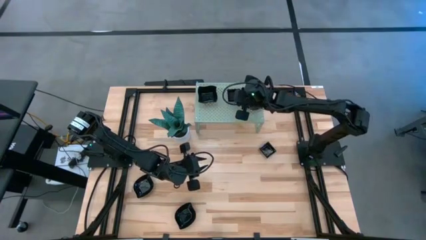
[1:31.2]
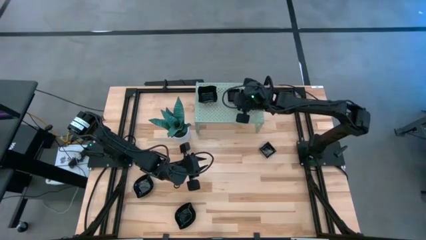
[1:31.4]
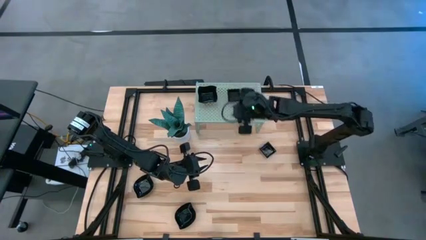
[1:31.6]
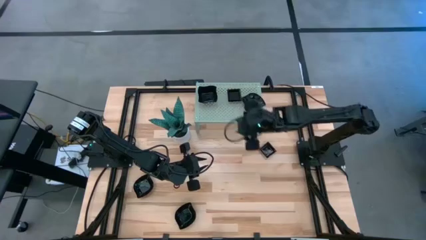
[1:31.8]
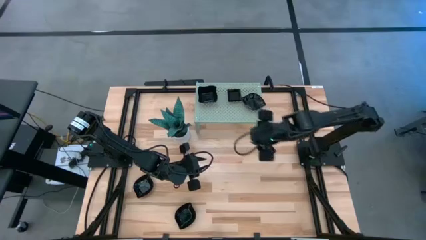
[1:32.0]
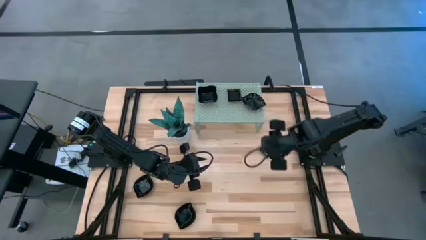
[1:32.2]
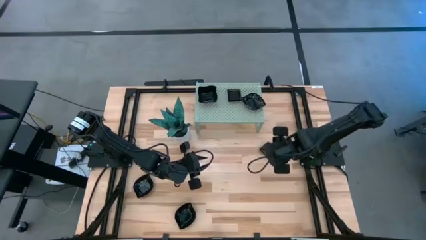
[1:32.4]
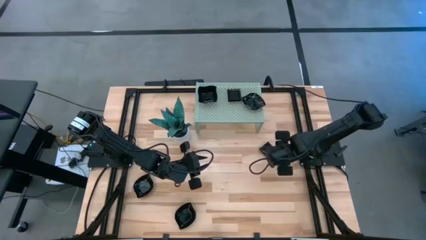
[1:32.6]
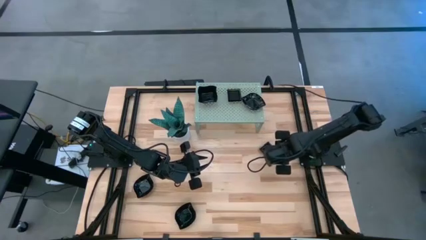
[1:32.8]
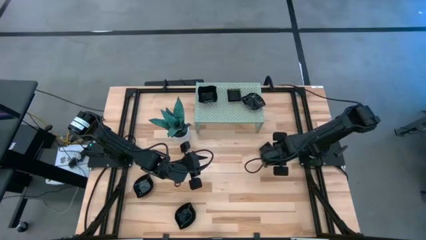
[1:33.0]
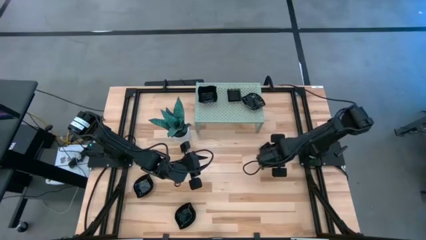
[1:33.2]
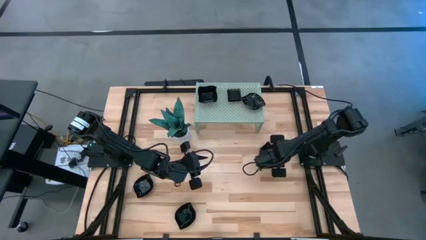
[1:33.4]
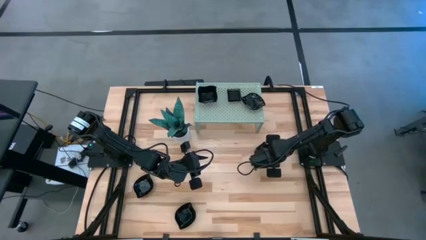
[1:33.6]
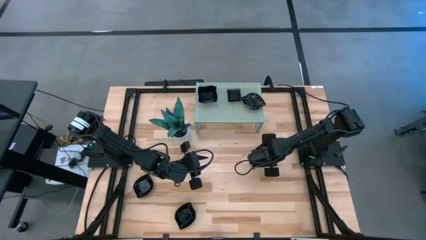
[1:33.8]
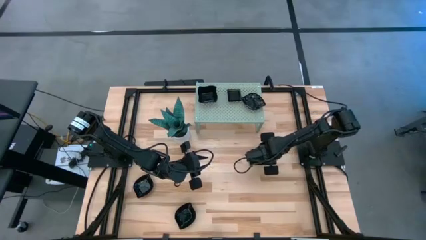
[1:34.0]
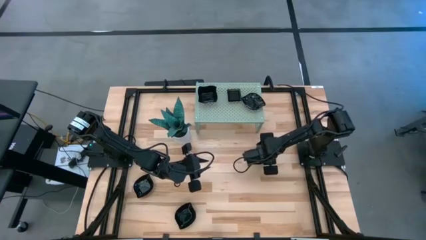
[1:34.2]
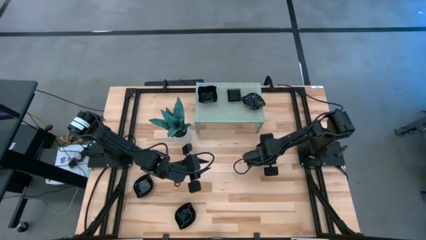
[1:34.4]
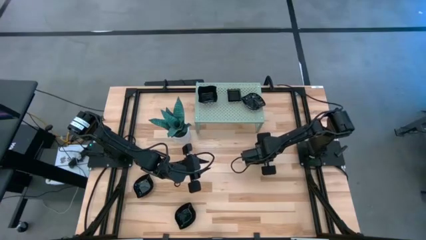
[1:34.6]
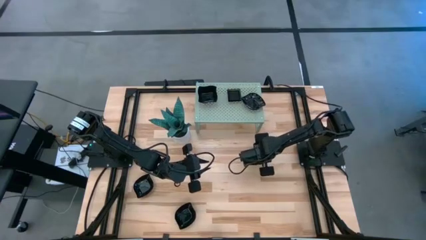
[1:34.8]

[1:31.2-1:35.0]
Task: Pick & Place Mini shaped plates
Stack the square plate on top of the square plate on the shelf

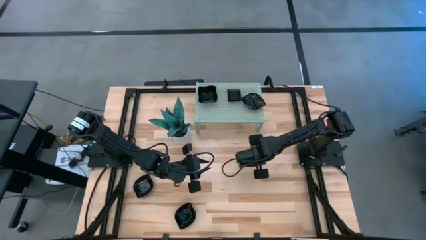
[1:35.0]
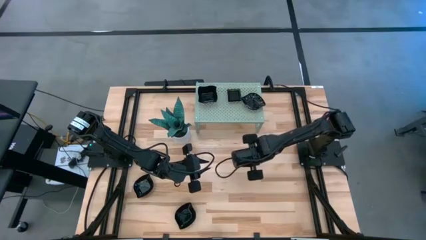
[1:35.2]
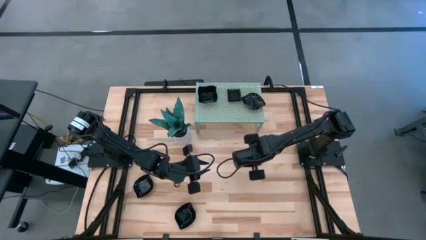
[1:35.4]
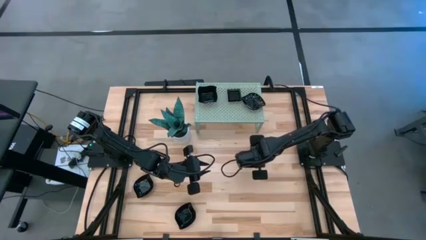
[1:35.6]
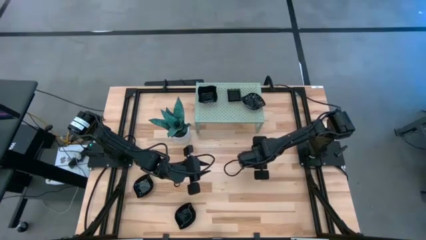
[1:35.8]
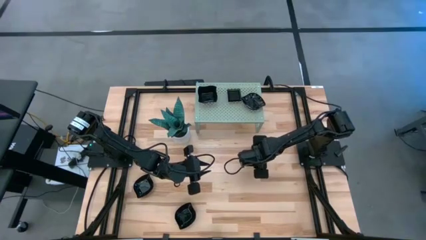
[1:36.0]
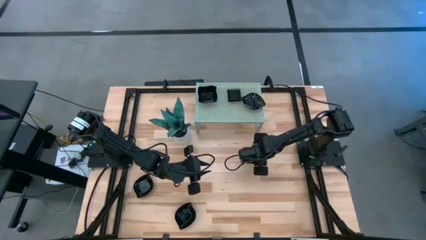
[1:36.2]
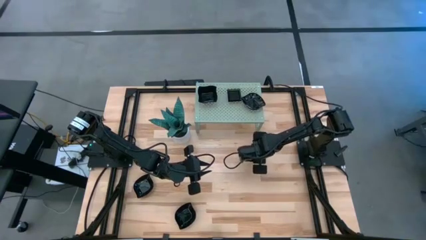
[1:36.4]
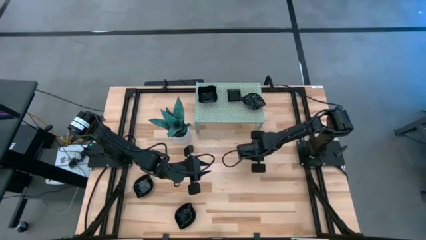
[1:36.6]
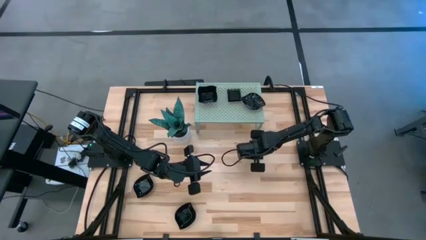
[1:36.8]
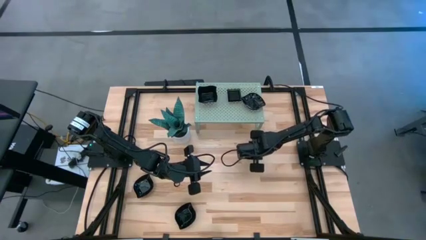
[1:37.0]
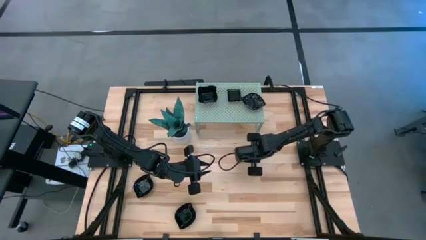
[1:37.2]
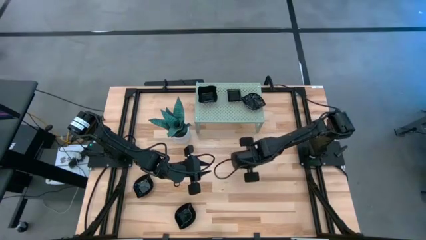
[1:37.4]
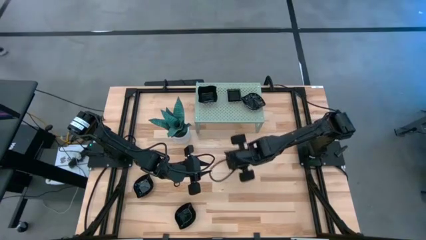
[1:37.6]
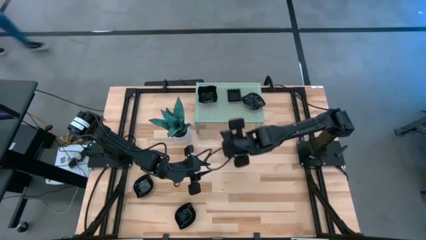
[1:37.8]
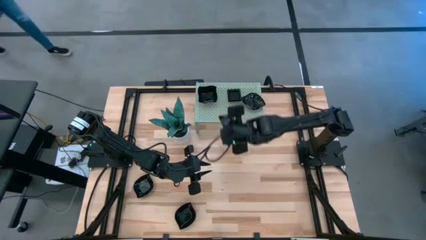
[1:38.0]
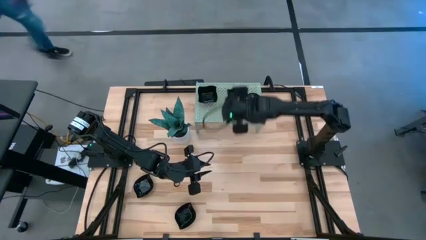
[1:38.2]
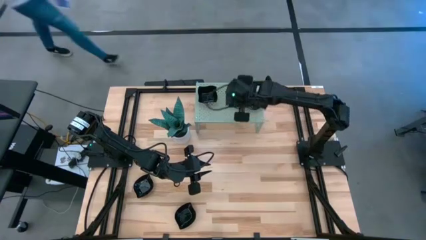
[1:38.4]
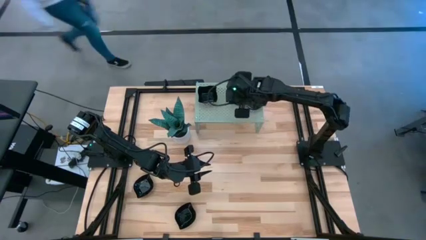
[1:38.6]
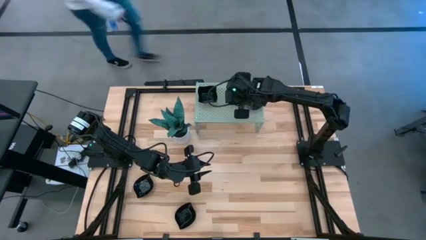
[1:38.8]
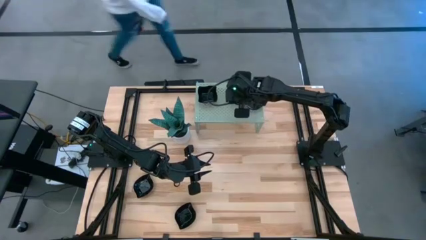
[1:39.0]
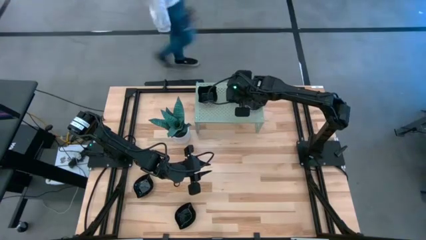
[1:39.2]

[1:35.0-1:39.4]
Stack the square plate on top of the other square plate on the shelf

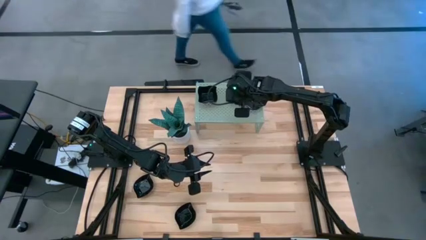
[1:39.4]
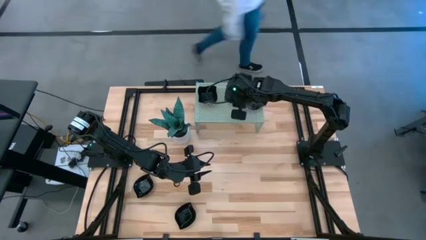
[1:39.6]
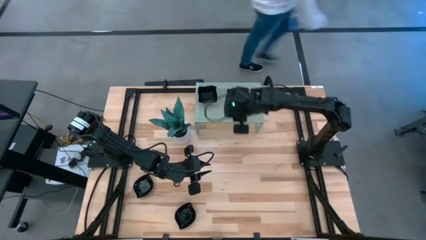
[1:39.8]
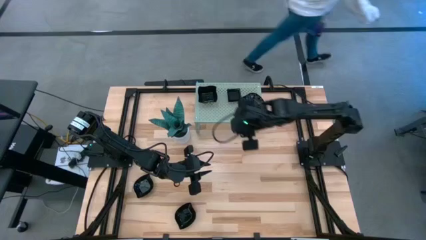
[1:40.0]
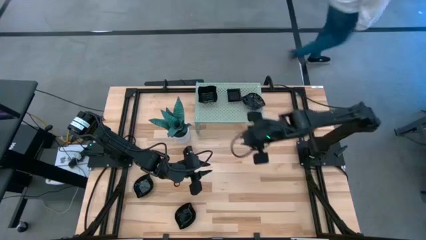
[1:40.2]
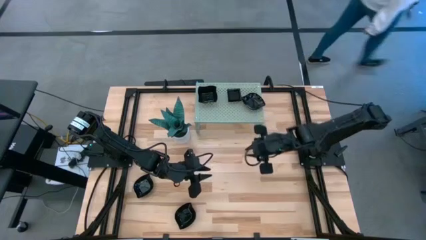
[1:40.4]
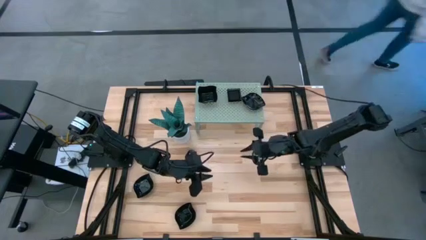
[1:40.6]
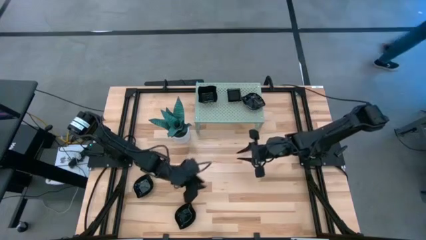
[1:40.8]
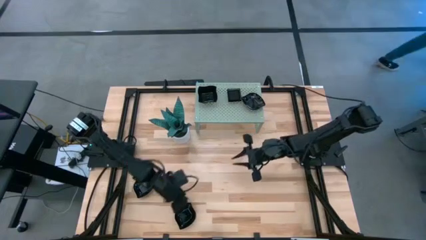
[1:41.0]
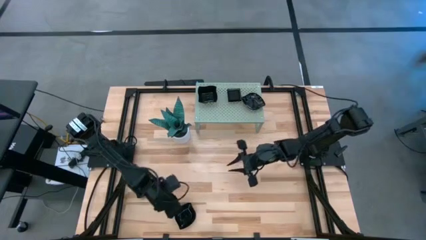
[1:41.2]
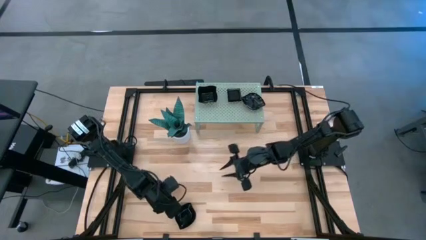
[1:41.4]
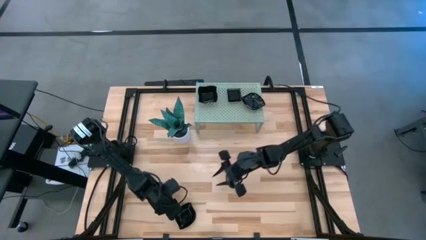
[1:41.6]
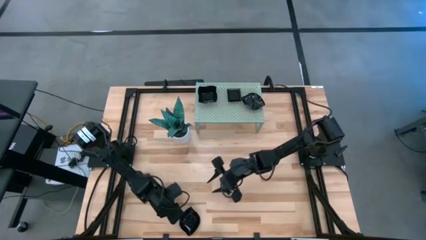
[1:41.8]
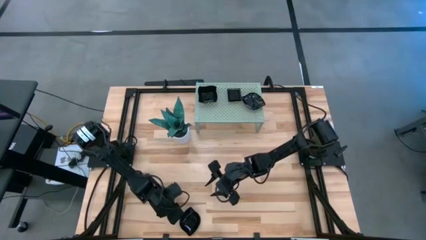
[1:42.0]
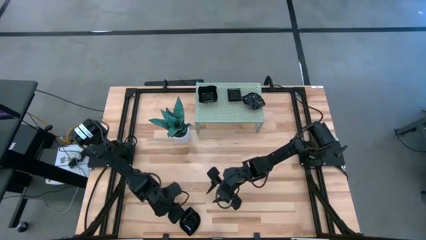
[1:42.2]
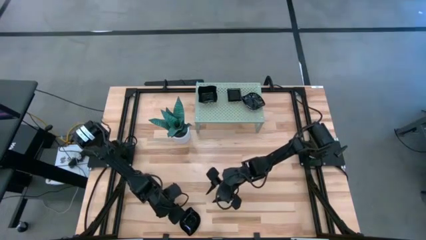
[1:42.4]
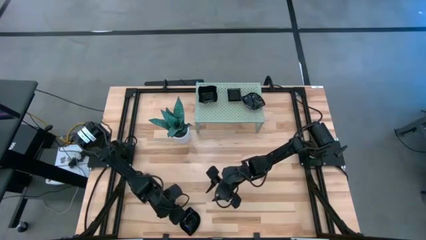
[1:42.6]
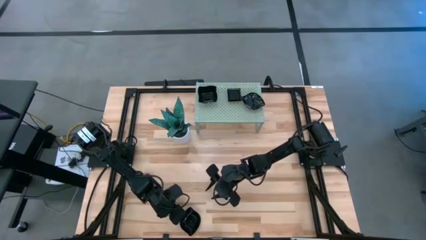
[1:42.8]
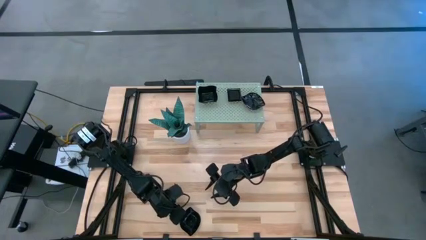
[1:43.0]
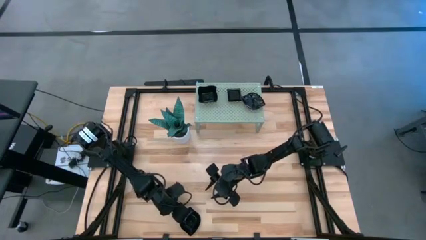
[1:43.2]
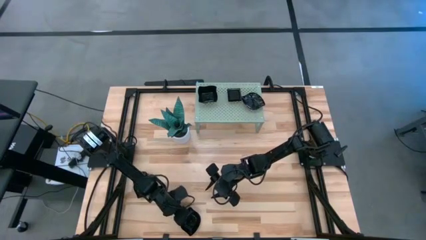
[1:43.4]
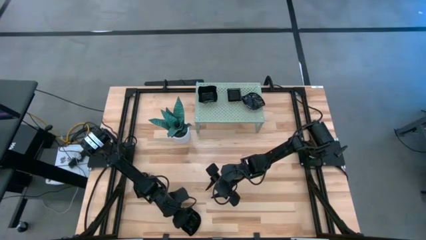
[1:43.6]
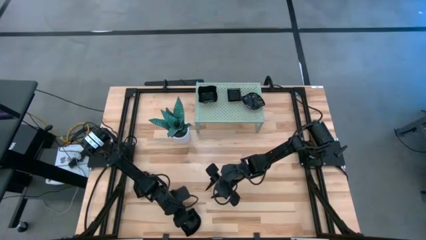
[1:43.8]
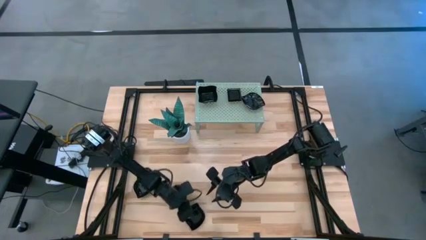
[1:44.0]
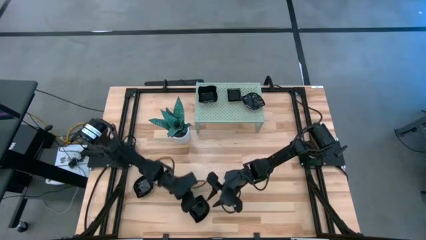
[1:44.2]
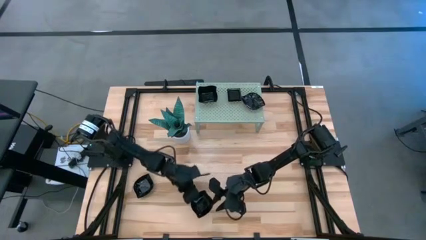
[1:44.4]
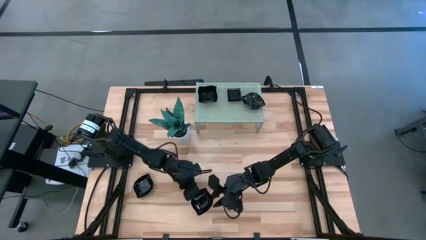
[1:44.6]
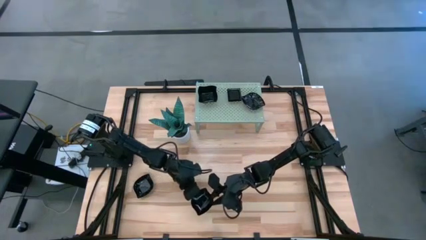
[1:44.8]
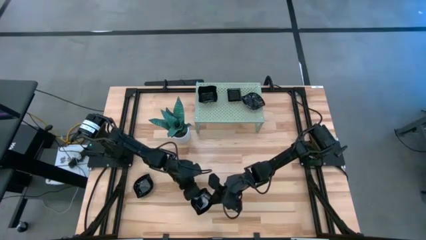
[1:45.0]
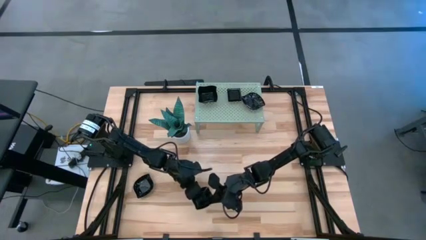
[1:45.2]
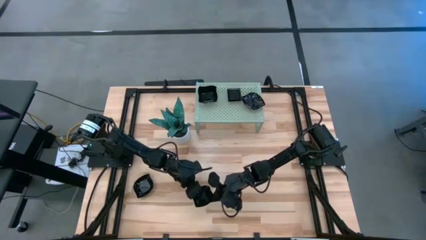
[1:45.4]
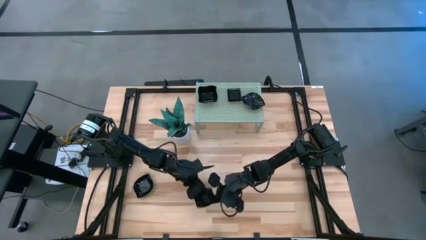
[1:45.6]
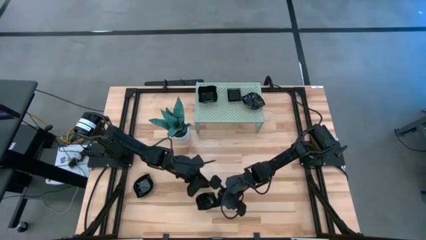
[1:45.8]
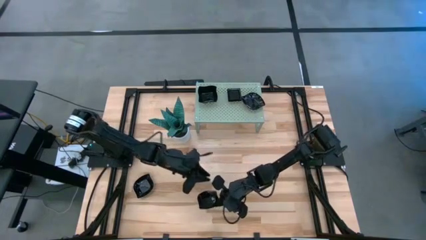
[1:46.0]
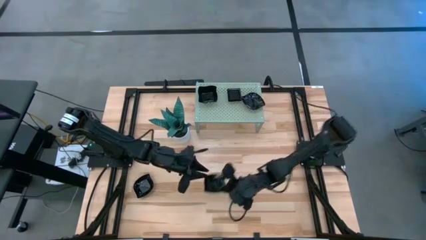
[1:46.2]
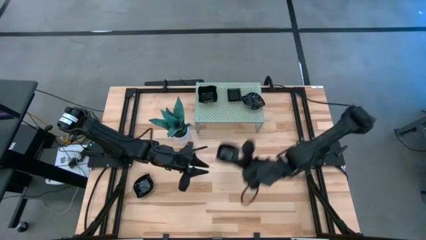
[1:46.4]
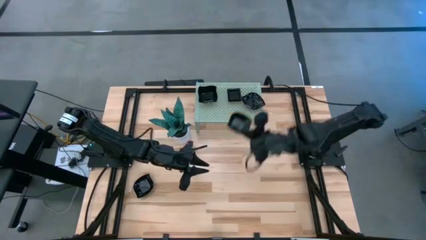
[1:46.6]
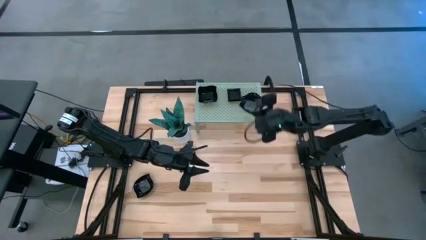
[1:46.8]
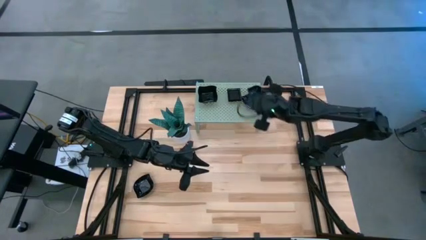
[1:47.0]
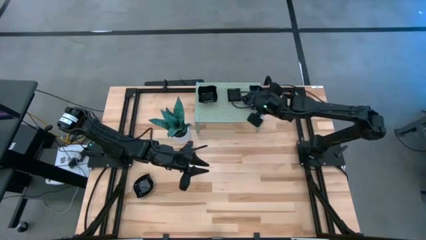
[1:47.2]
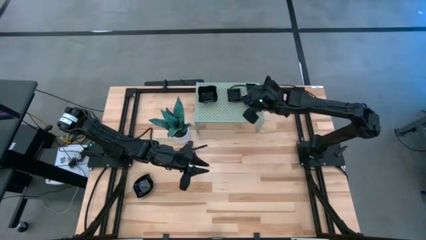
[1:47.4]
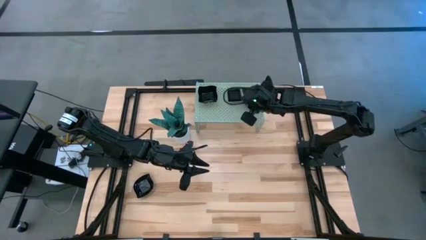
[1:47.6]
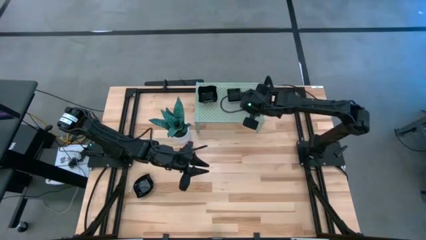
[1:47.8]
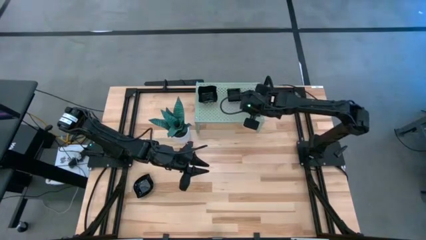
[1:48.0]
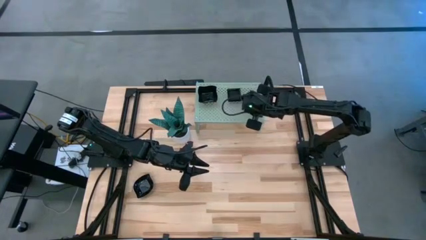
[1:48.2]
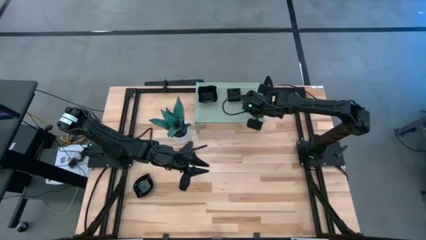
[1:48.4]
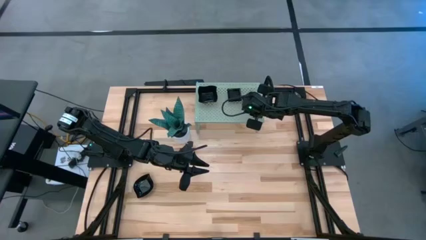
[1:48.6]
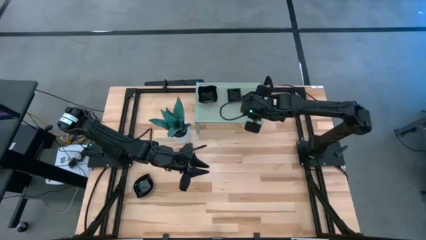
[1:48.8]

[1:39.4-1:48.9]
Stack the leaf-shaped plate on top of the other leaf-shaped plate on the shelf
